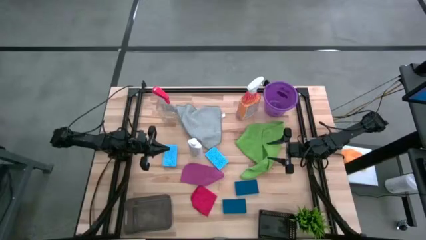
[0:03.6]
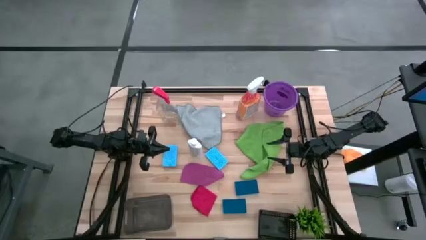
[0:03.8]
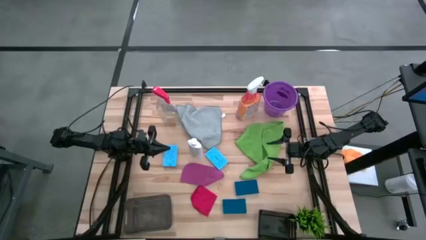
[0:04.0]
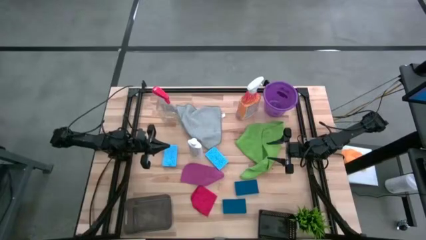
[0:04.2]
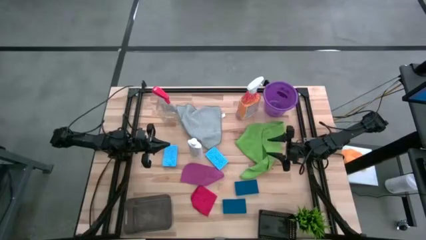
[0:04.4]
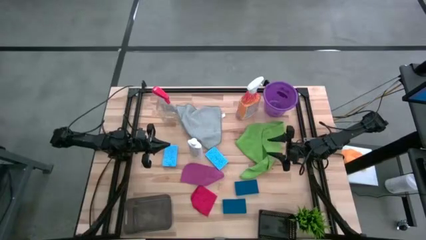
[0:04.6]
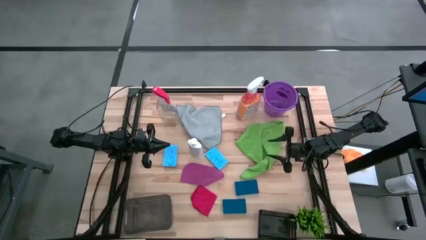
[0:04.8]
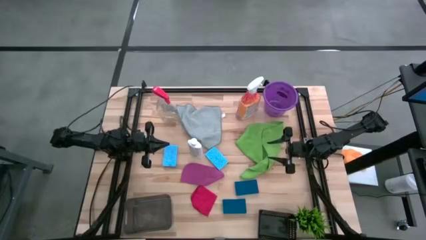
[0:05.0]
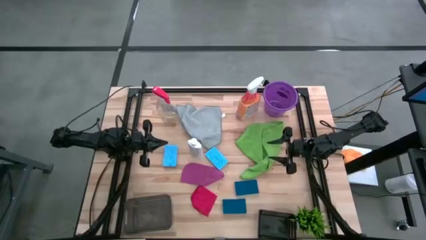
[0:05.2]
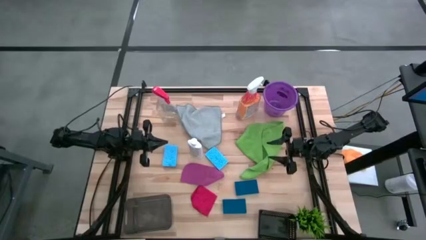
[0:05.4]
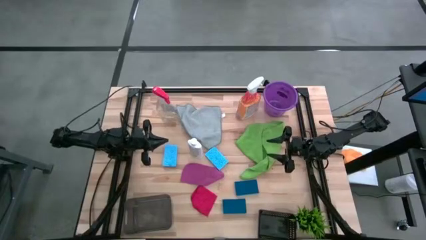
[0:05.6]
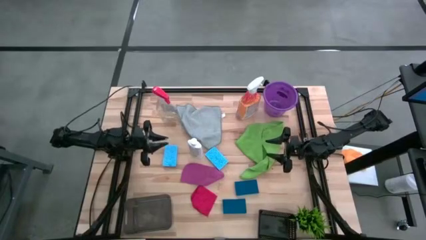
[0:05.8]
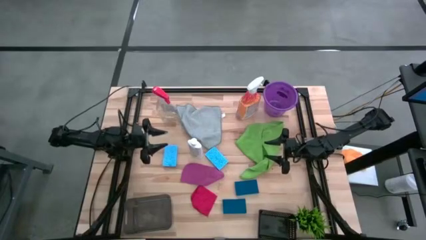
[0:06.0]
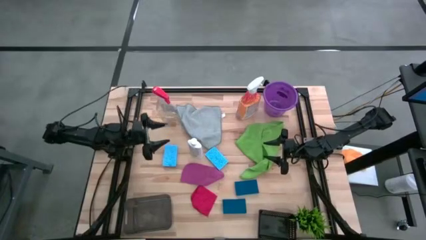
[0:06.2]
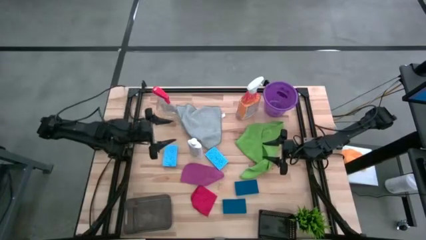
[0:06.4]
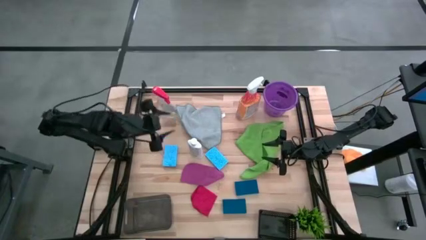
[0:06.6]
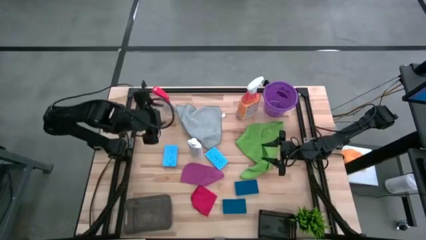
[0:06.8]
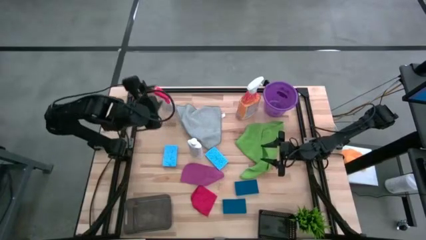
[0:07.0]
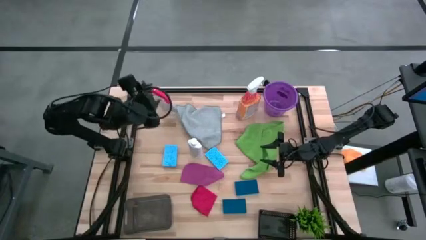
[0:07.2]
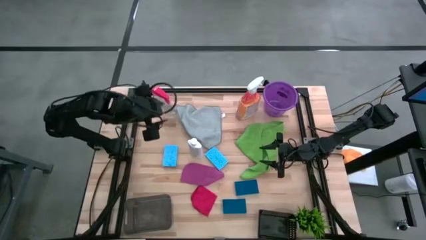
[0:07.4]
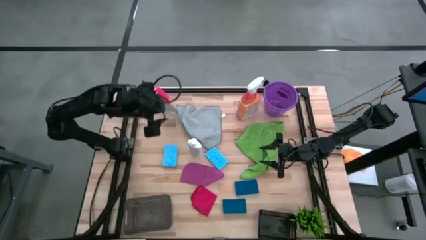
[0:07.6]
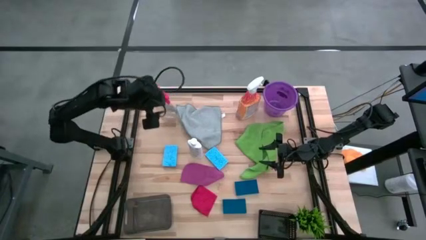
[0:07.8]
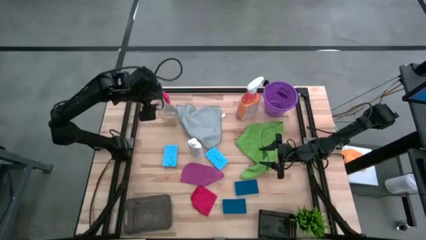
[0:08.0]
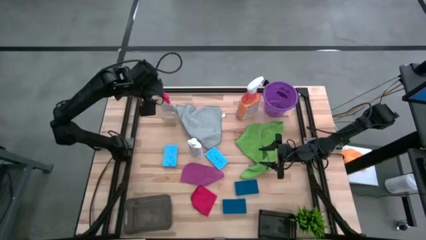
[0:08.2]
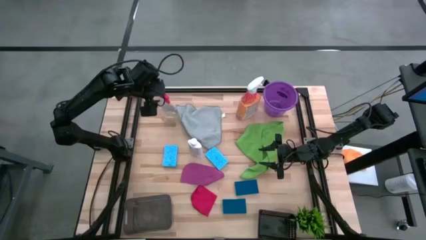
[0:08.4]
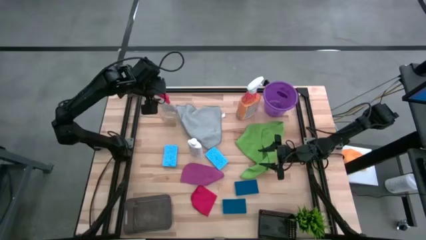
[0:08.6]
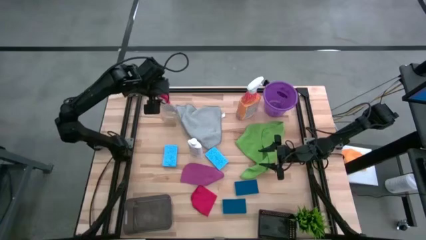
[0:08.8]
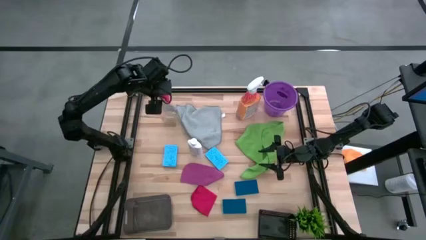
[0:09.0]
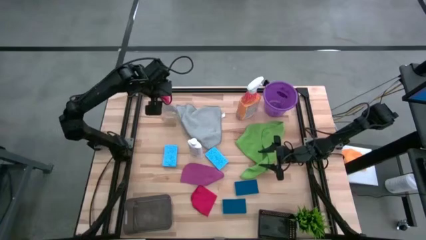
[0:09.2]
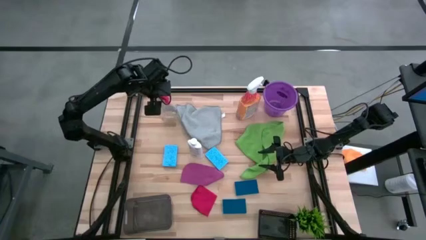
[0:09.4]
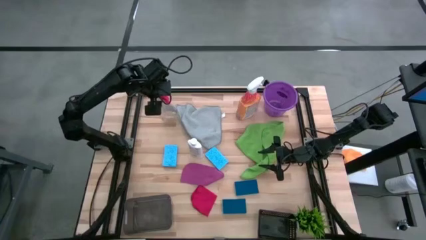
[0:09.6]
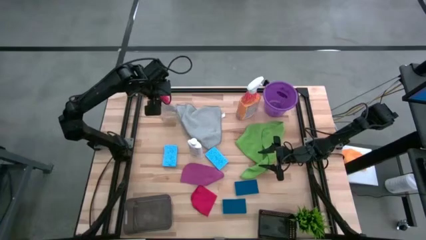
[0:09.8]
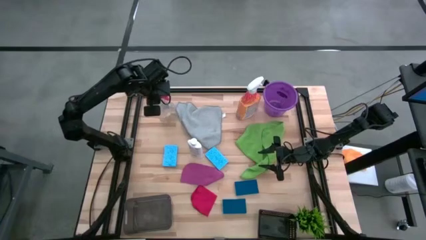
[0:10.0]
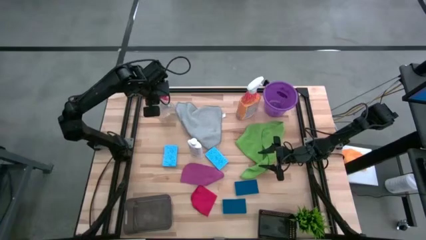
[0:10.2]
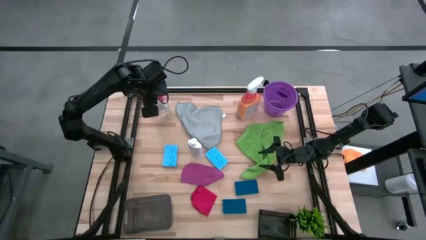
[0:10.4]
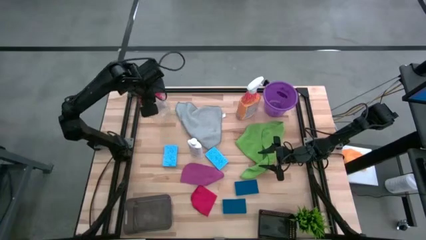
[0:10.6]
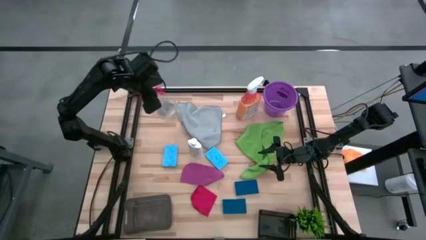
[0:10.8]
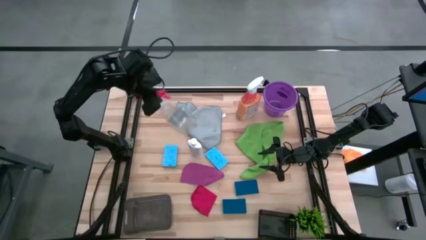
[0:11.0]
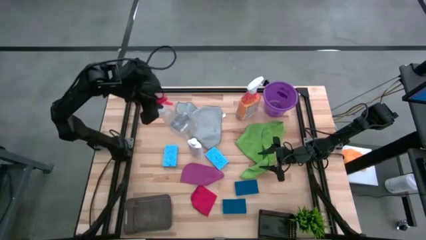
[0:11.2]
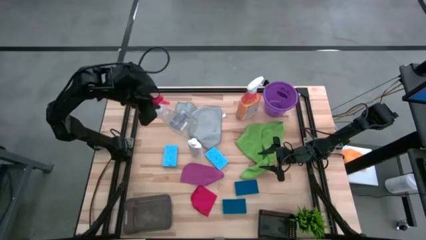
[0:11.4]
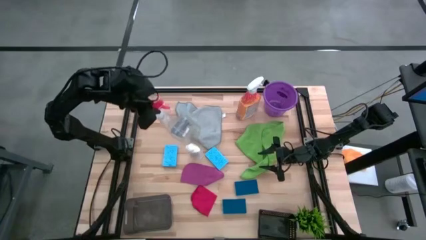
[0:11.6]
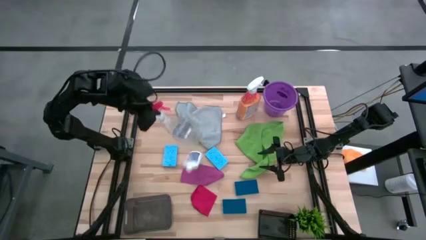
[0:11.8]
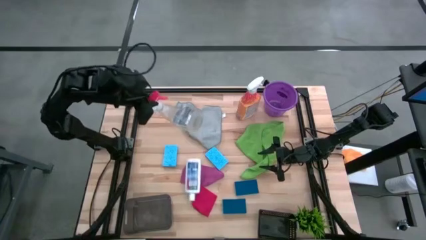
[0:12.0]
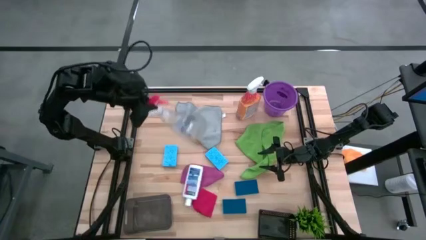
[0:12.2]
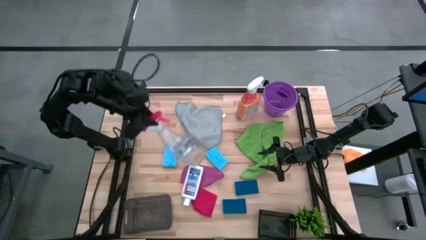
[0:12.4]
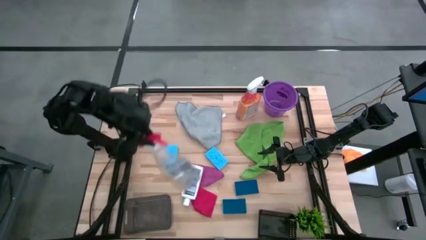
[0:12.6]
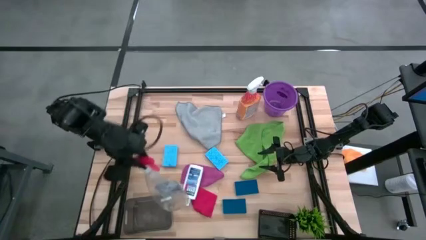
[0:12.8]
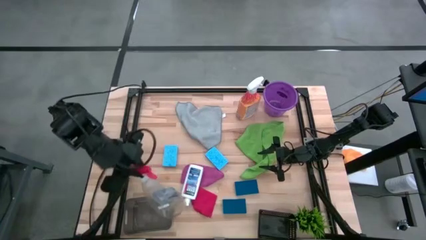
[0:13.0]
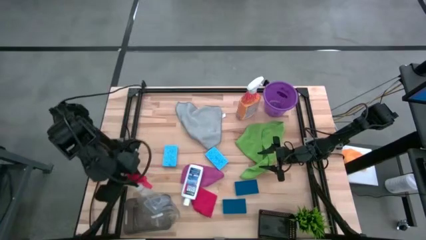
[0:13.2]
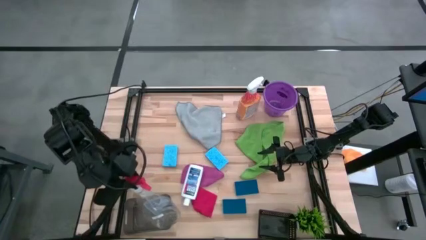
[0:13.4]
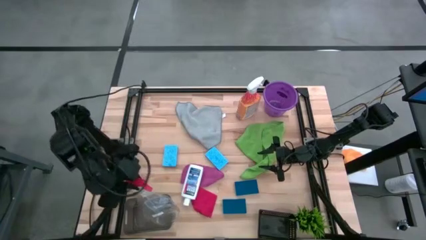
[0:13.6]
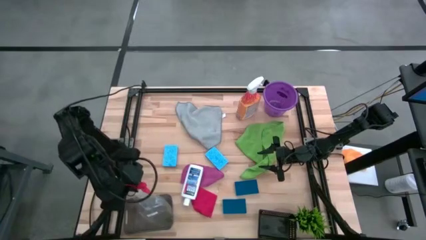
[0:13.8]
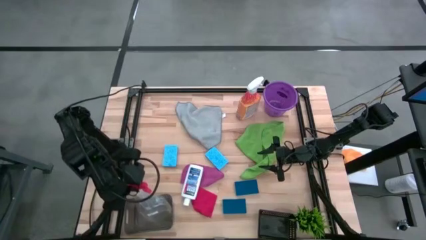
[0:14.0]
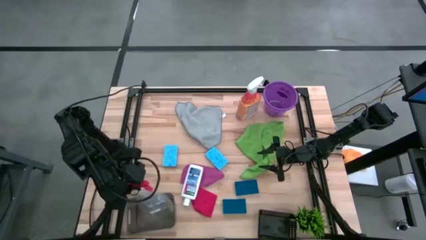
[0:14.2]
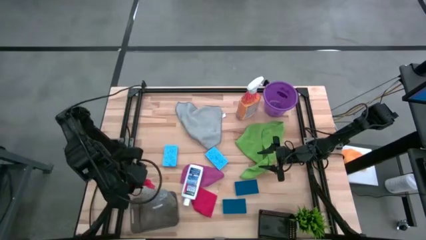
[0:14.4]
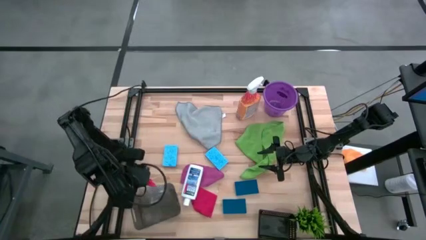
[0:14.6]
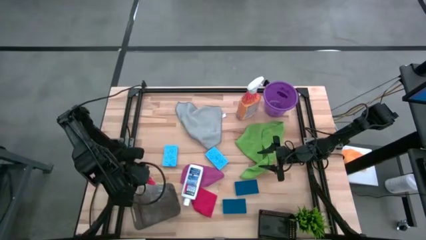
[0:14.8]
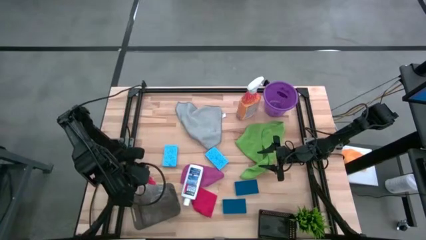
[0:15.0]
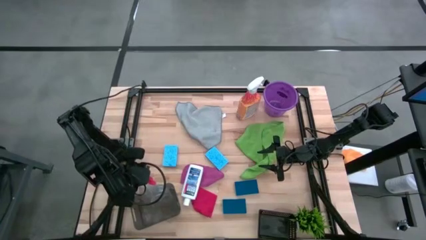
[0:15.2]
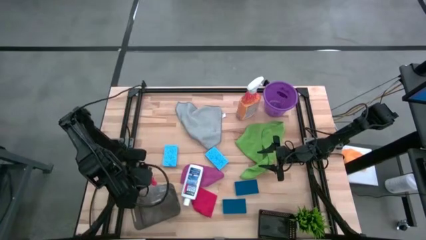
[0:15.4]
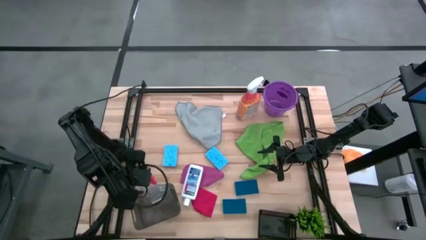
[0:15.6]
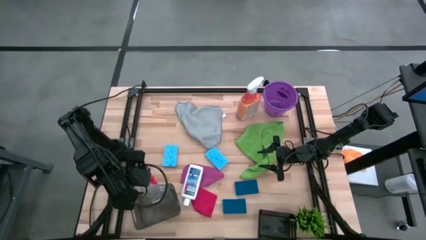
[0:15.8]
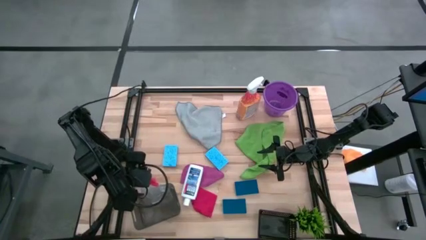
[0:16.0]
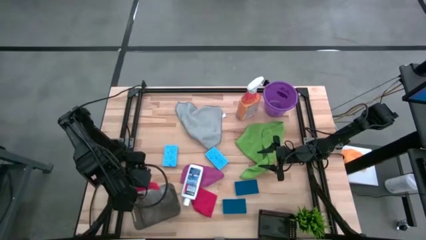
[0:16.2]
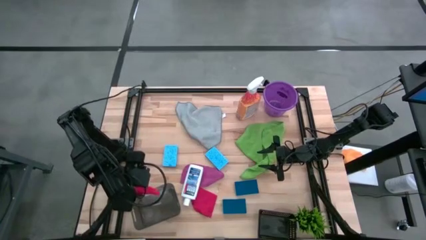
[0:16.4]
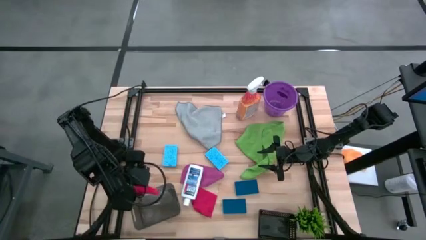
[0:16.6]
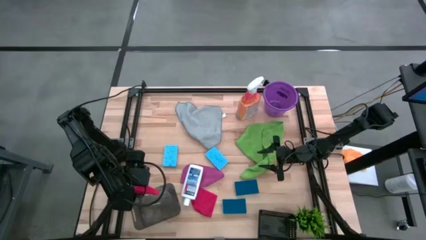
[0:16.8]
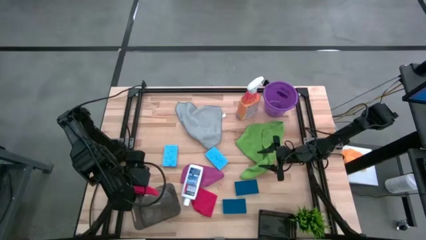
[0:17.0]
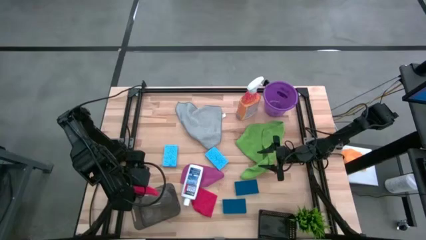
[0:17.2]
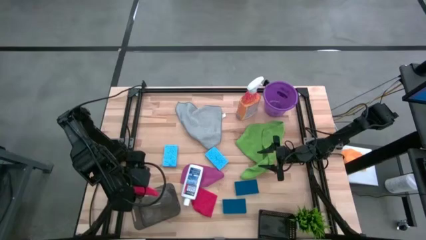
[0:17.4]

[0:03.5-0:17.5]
Task: Pick & Place Kitchen Items
Put the transparent spray bottle into the gray bin
